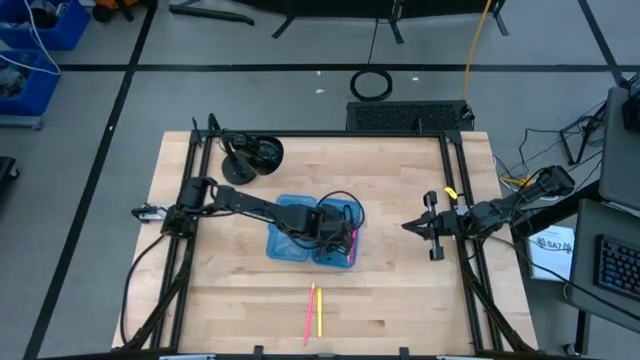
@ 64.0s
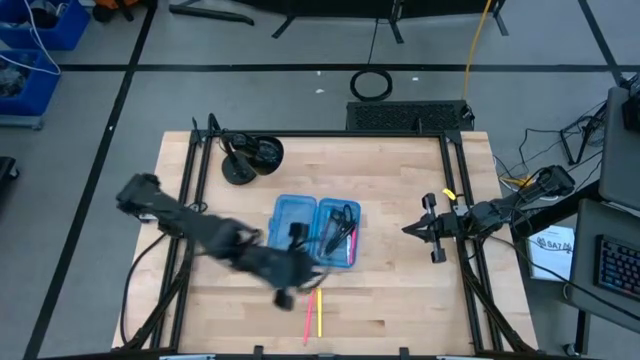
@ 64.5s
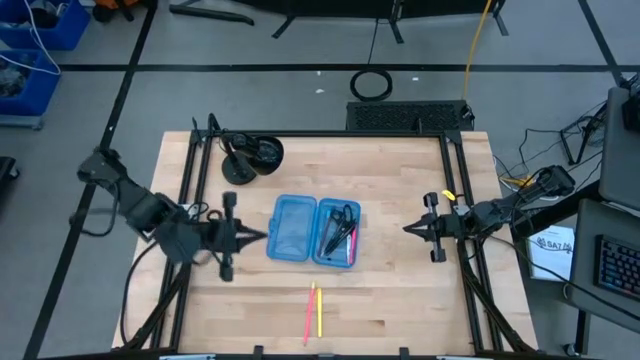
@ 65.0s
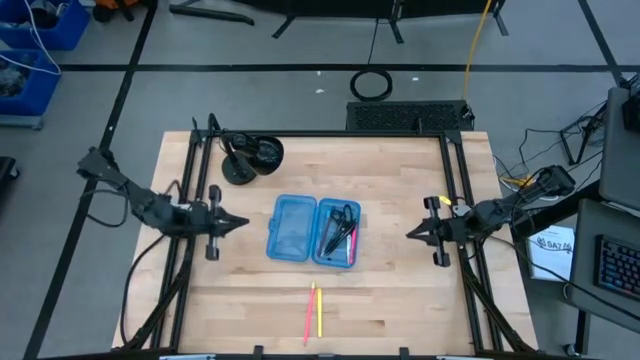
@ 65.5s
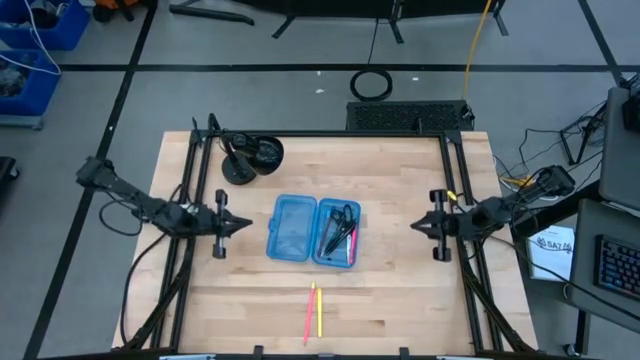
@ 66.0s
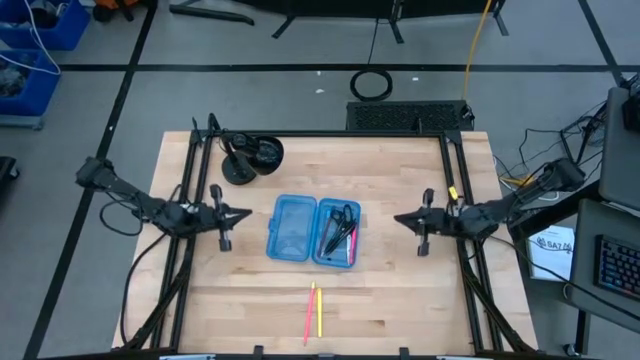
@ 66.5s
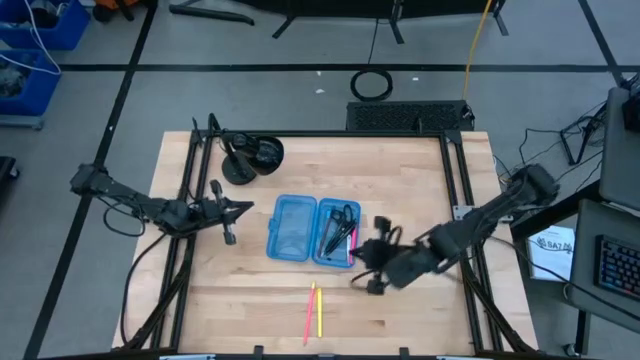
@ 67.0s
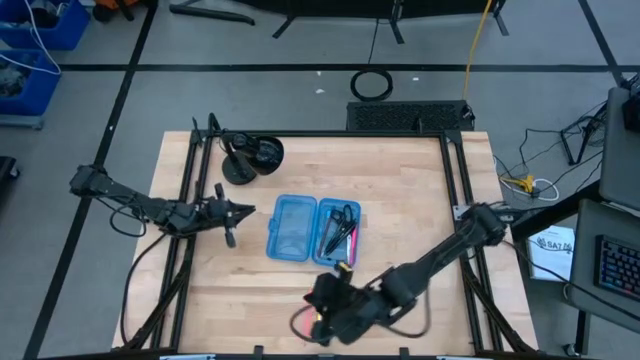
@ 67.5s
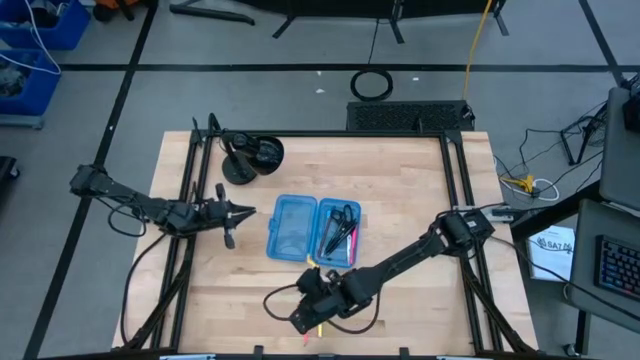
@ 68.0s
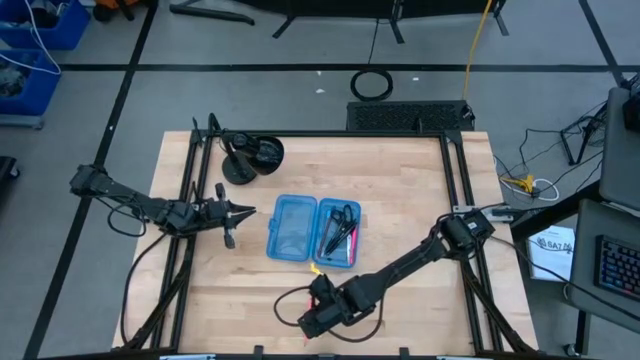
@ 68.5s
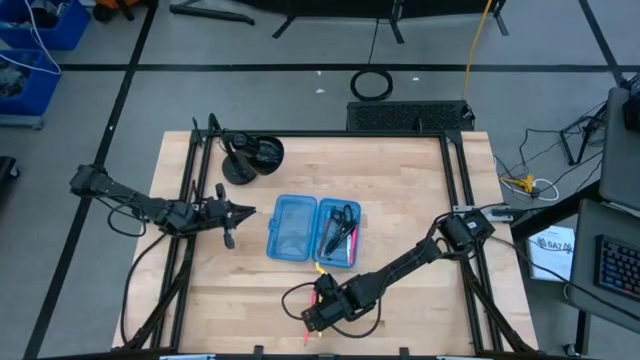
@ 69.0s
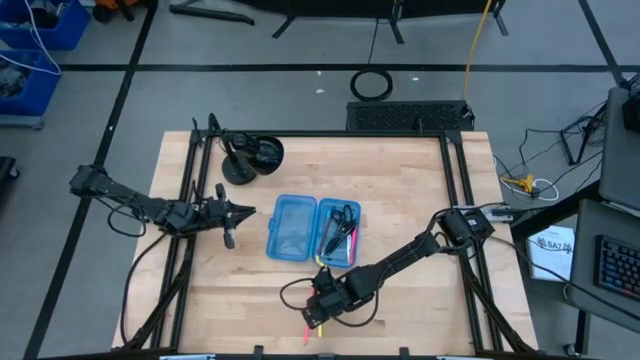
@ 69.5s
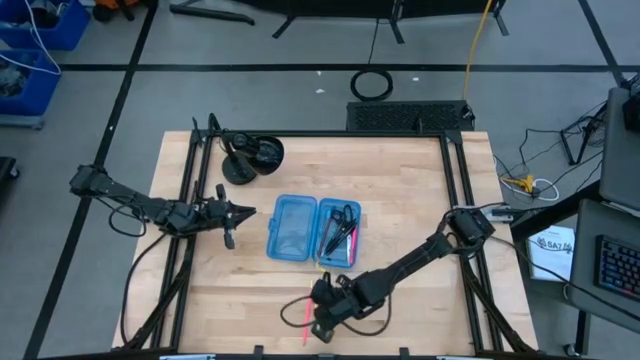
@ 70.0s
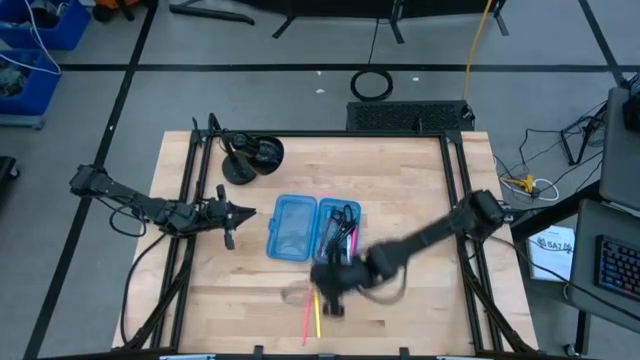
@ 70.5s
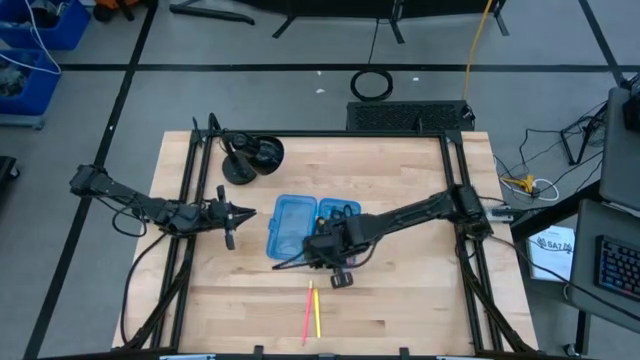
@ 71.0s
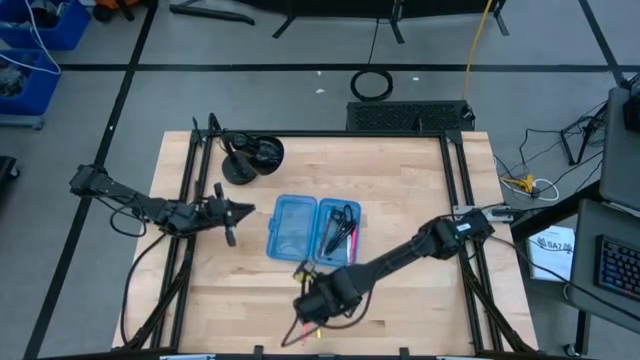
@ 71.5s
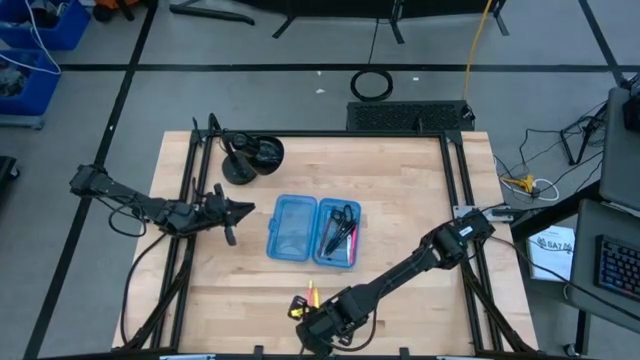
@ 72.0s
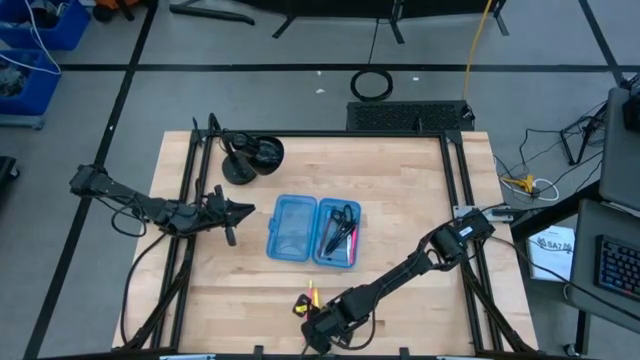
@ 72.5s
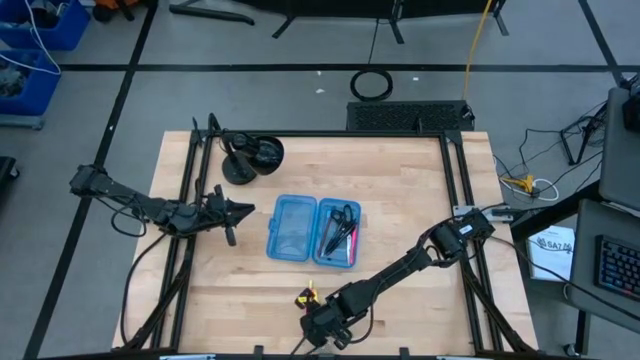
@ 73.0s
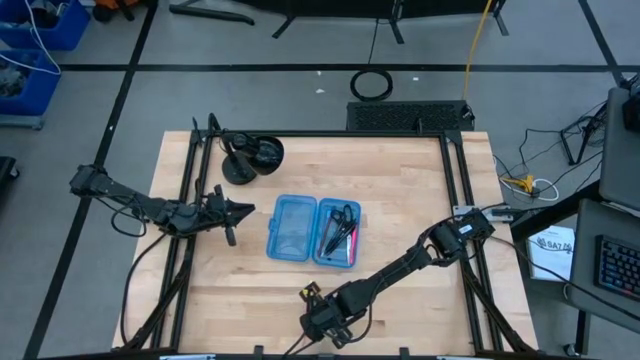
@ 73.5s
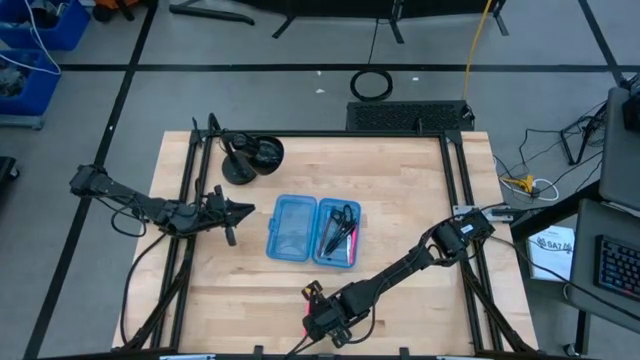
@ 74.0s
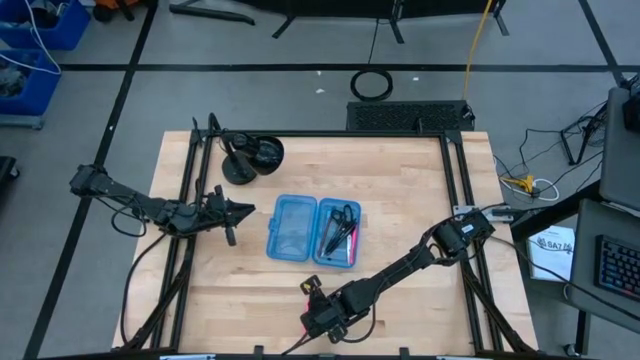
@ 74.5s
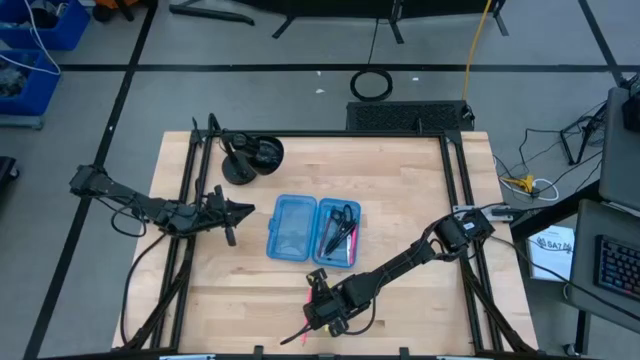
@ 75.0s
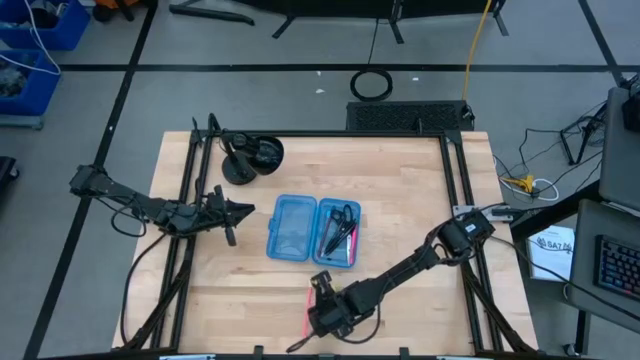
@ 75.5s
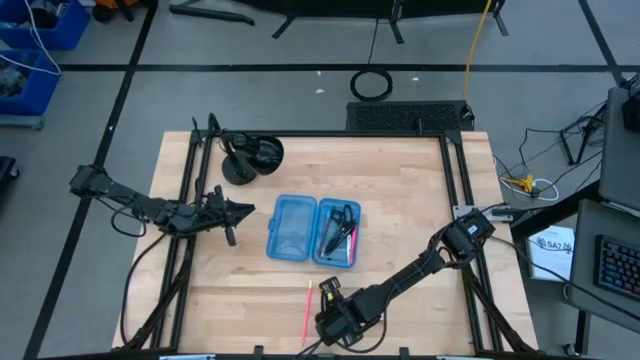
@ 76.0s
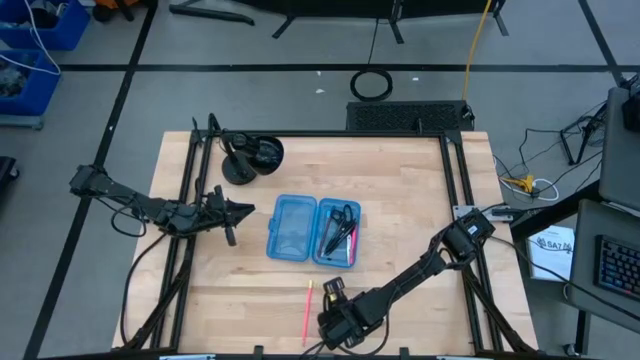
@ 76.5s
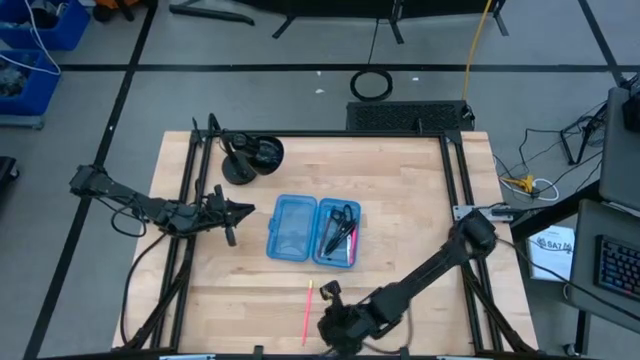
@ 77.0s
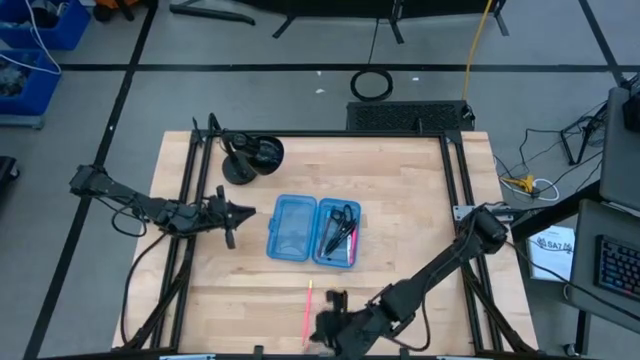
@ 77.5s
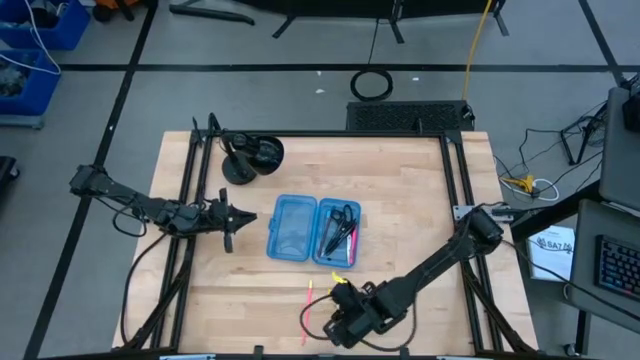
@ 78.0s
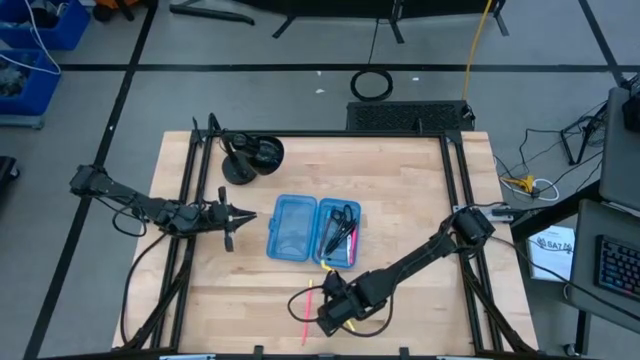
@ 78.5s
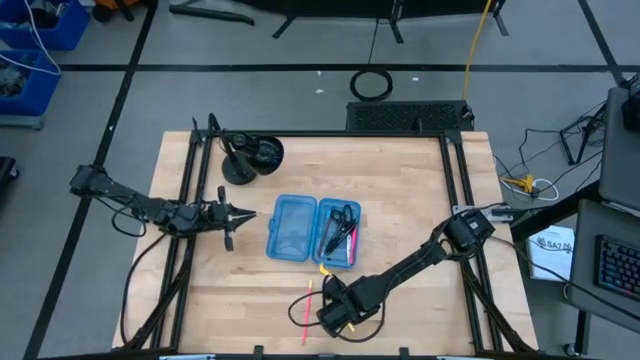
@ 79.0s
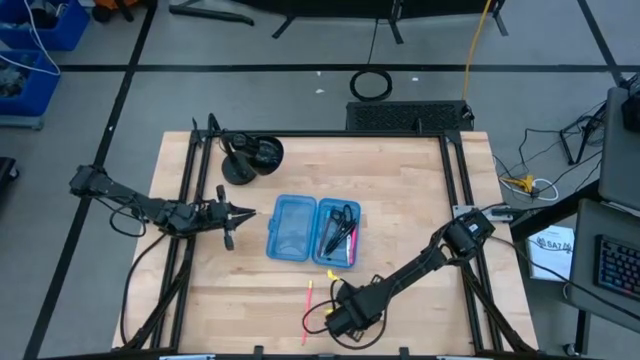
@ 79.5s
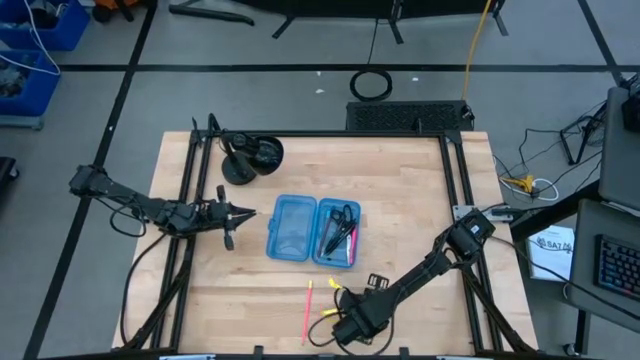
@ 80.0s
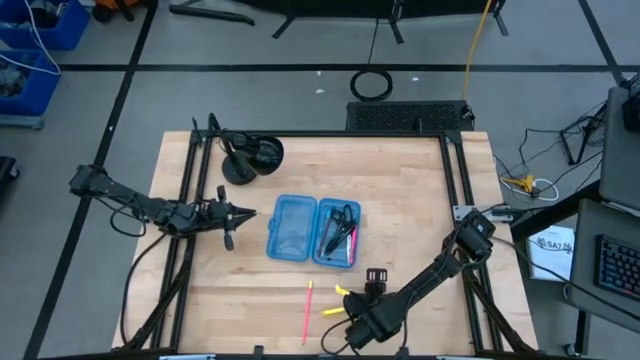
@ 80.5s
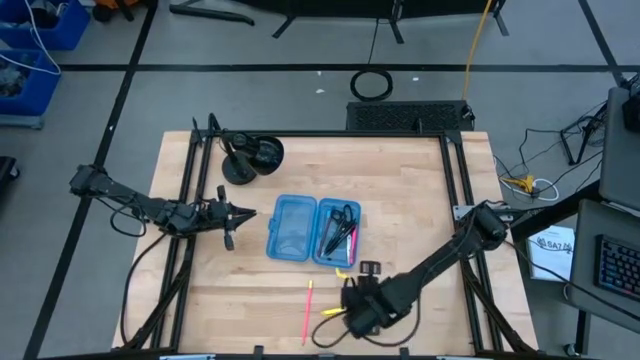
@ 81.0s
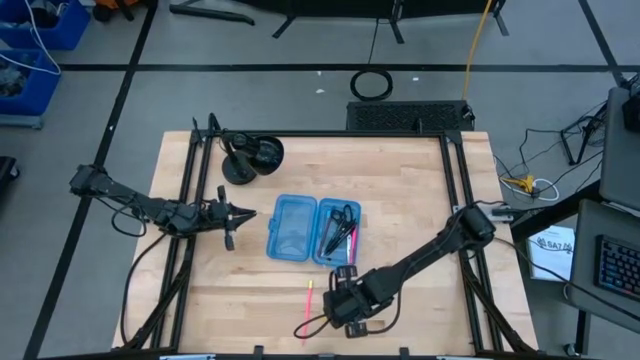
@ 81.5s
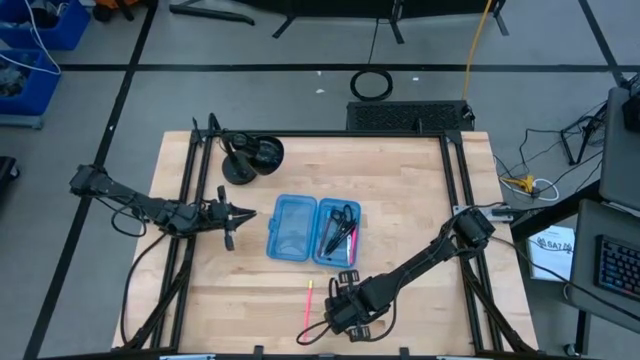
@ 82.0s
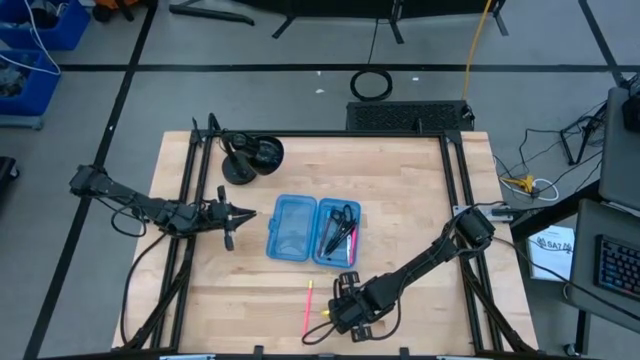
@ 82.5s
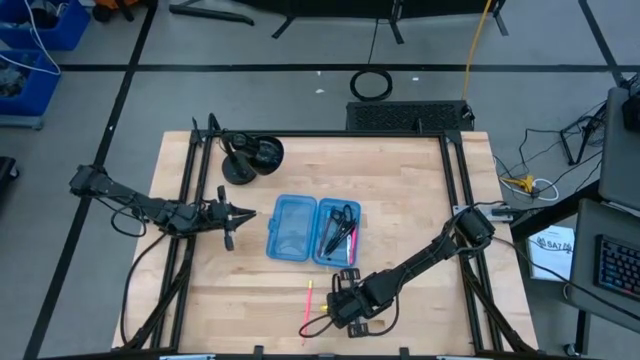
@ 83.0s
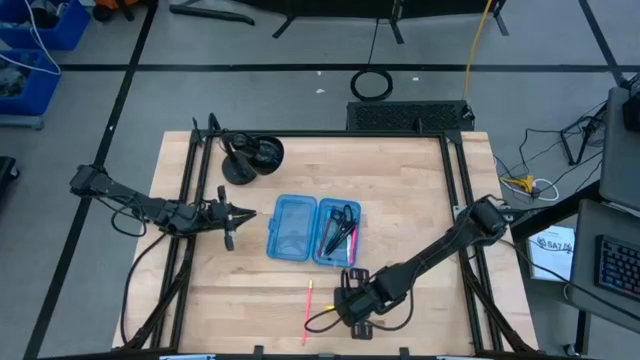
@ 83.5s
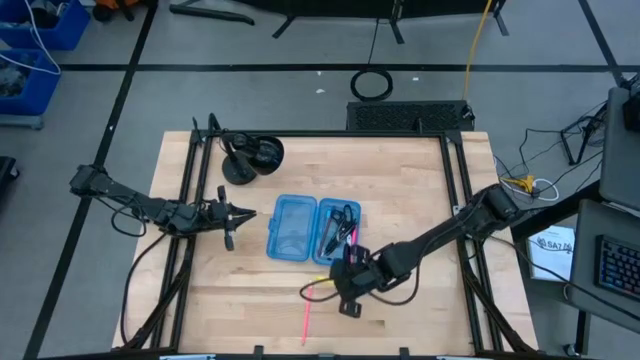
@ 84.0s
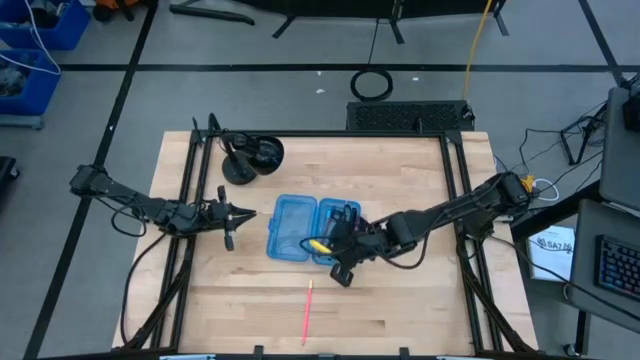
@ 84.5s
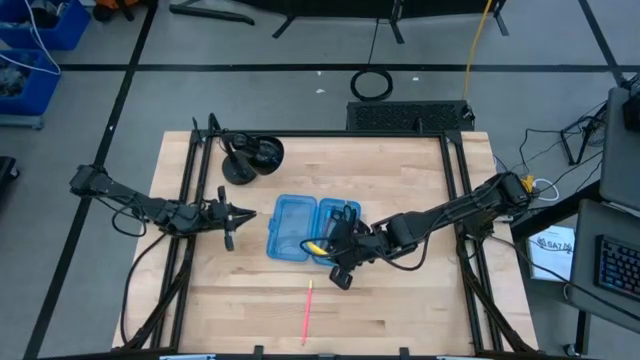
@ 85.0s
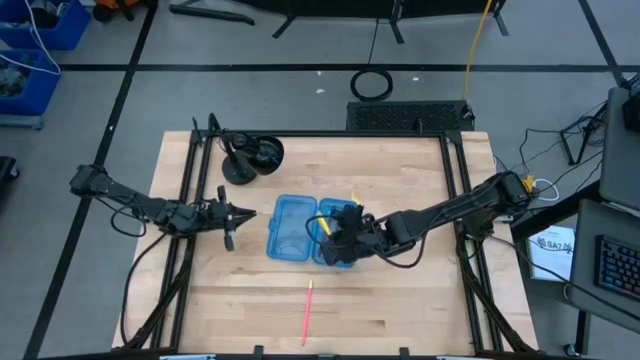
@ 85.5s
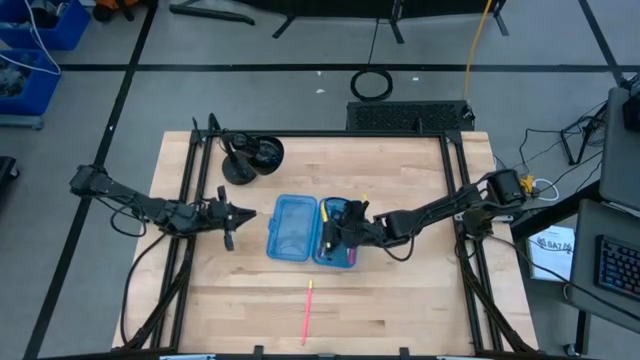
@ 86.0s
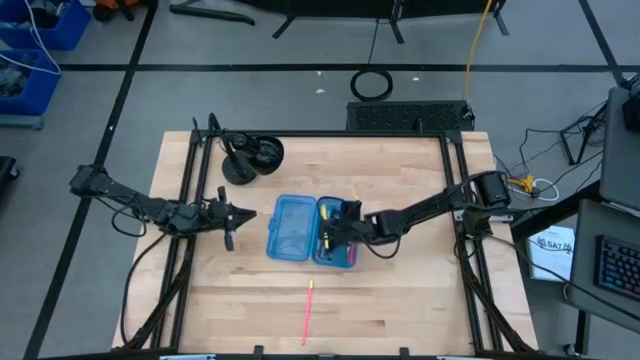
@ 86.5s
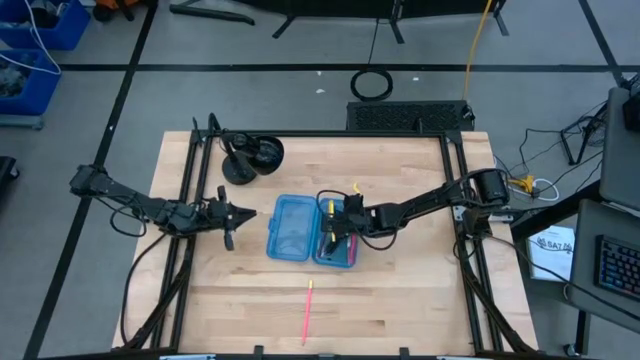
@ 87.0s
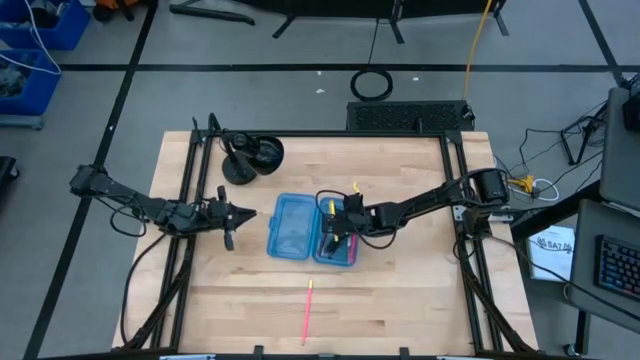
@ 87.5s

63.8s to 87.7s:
Task: Pick & place school supplies into a supply box
Put the yellow pen into the blue box
